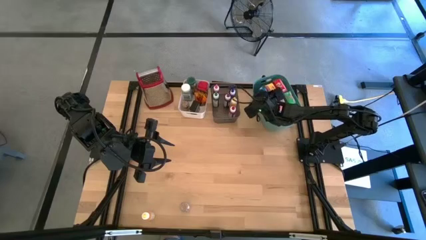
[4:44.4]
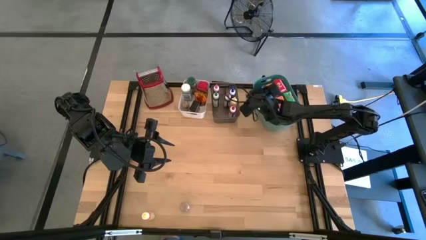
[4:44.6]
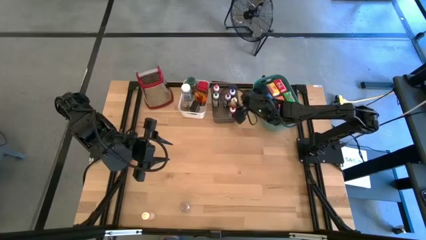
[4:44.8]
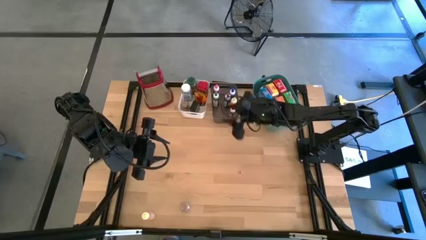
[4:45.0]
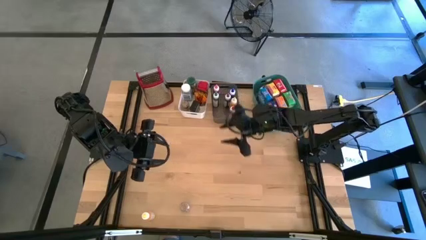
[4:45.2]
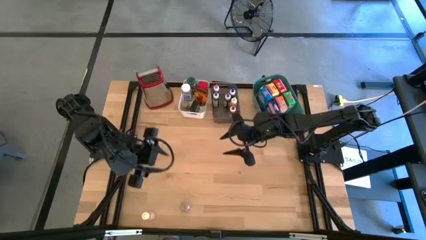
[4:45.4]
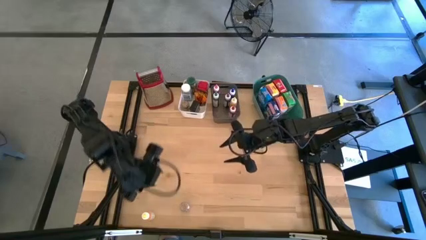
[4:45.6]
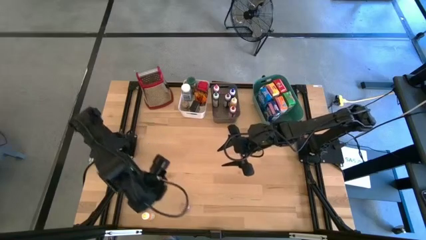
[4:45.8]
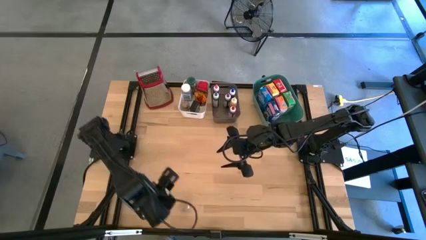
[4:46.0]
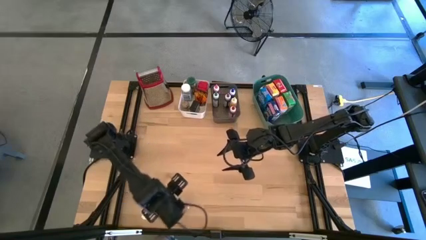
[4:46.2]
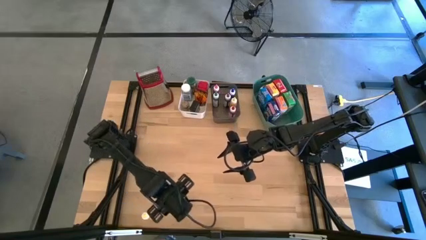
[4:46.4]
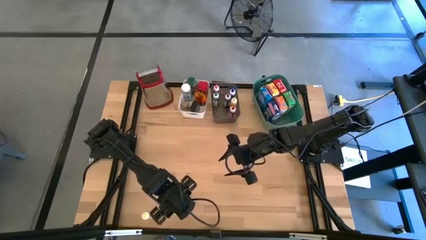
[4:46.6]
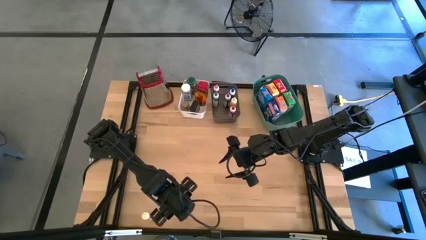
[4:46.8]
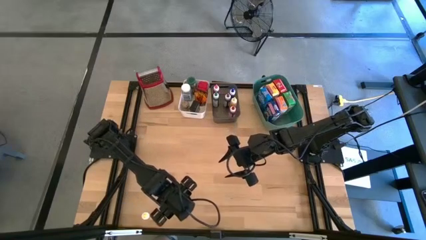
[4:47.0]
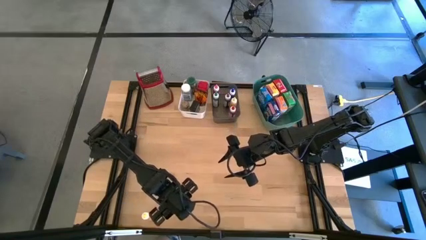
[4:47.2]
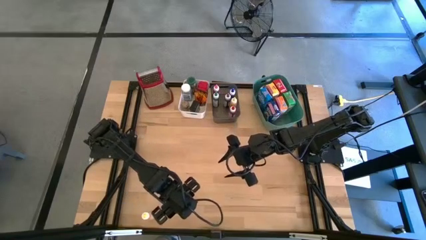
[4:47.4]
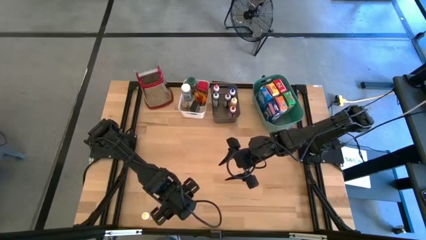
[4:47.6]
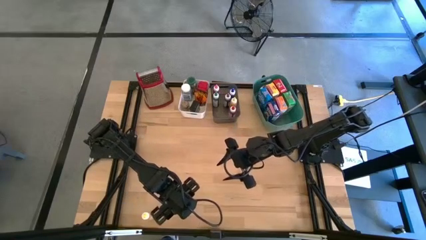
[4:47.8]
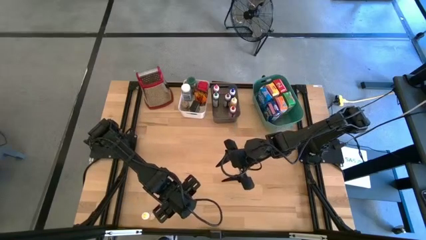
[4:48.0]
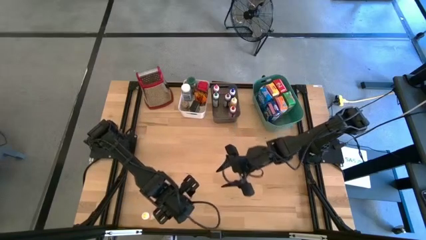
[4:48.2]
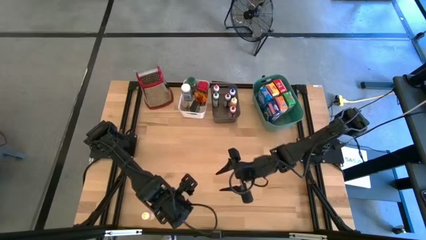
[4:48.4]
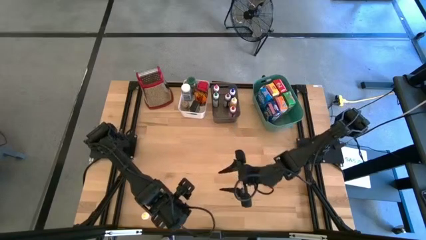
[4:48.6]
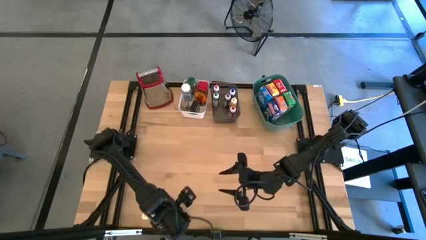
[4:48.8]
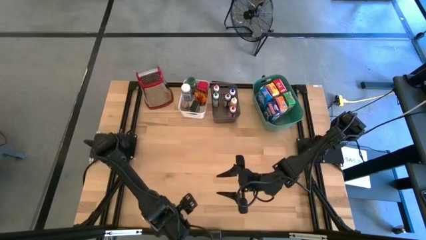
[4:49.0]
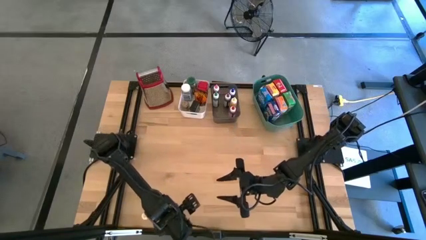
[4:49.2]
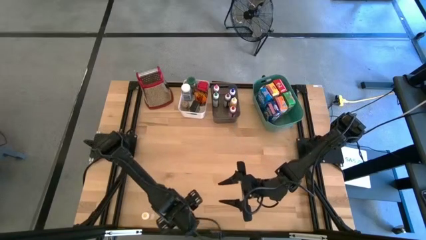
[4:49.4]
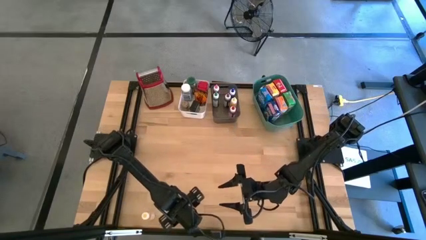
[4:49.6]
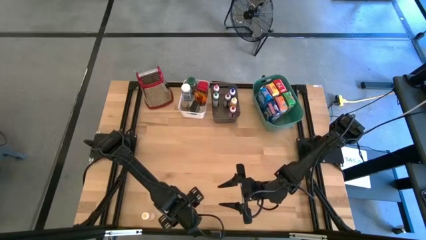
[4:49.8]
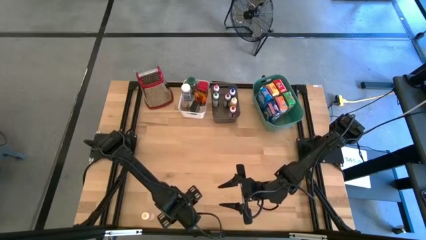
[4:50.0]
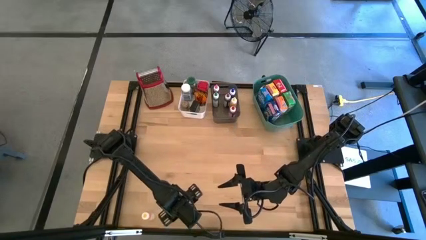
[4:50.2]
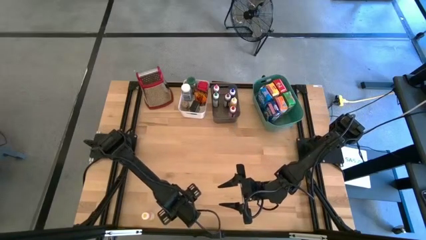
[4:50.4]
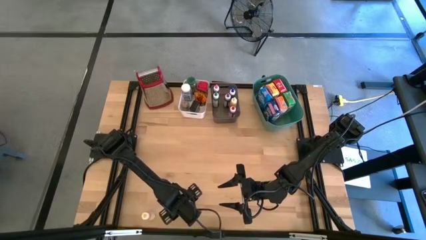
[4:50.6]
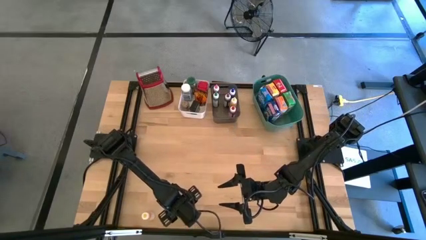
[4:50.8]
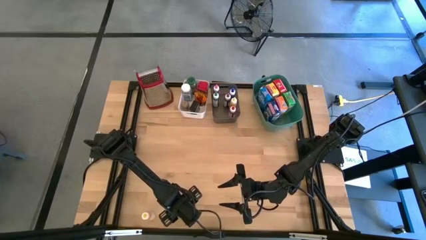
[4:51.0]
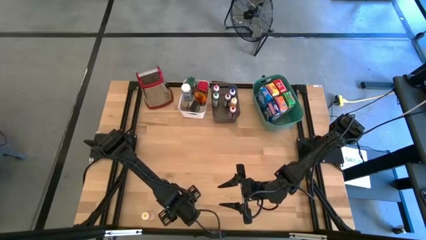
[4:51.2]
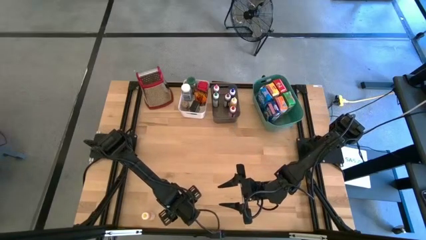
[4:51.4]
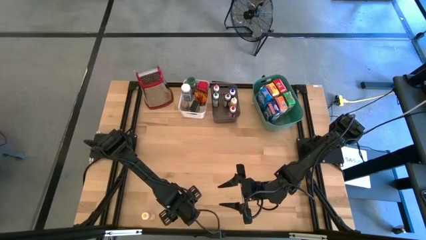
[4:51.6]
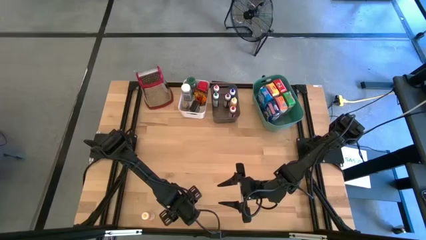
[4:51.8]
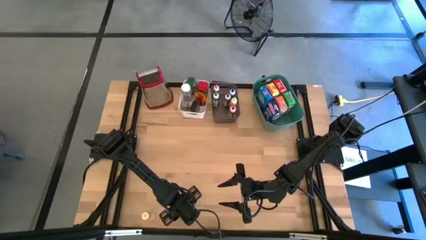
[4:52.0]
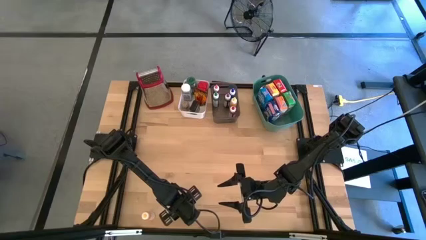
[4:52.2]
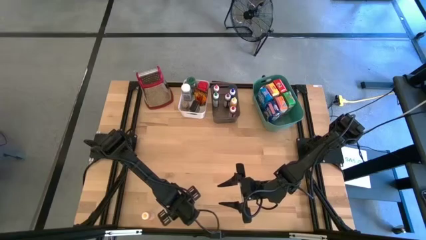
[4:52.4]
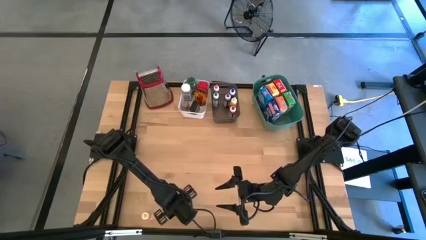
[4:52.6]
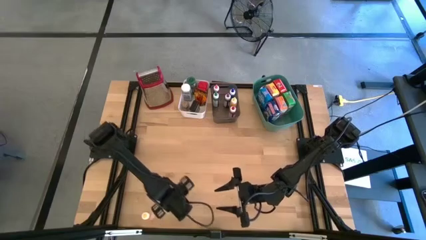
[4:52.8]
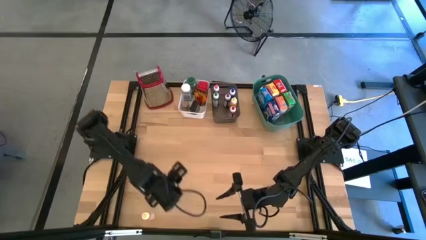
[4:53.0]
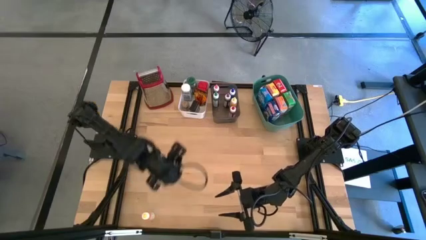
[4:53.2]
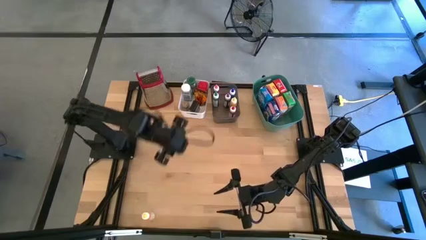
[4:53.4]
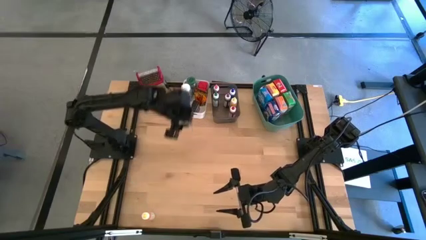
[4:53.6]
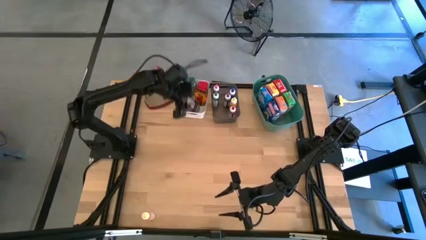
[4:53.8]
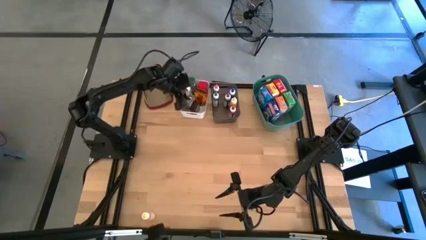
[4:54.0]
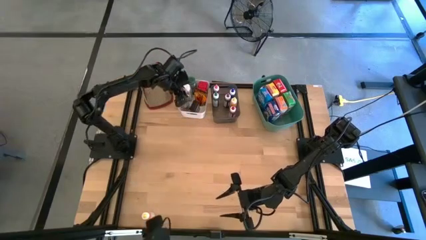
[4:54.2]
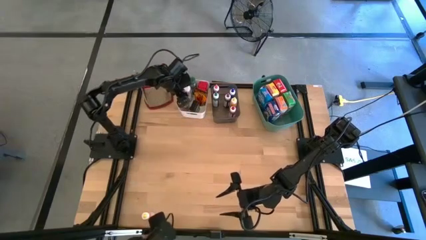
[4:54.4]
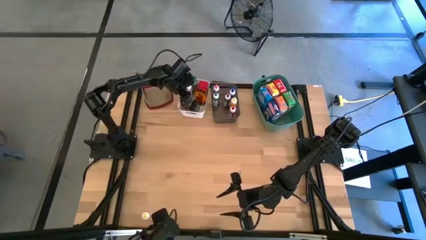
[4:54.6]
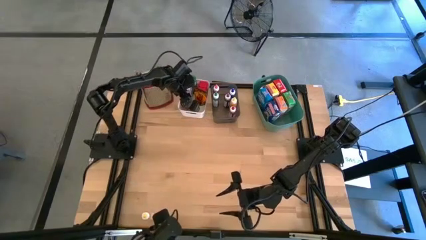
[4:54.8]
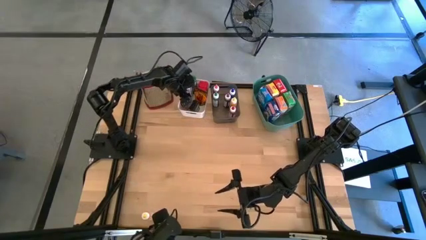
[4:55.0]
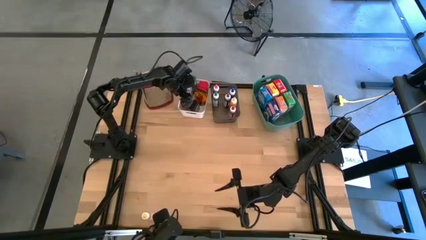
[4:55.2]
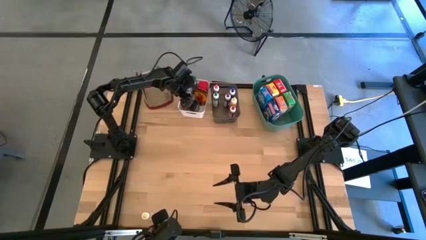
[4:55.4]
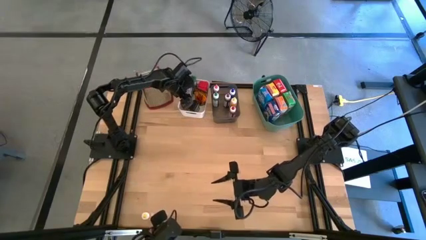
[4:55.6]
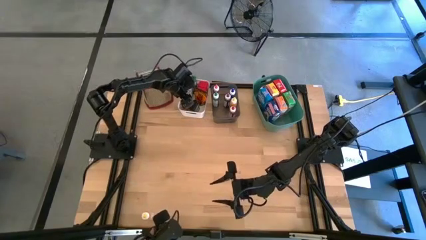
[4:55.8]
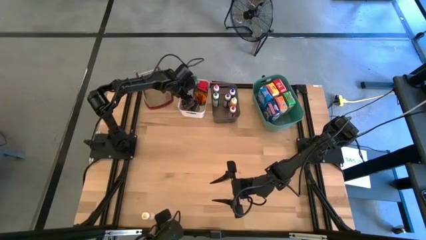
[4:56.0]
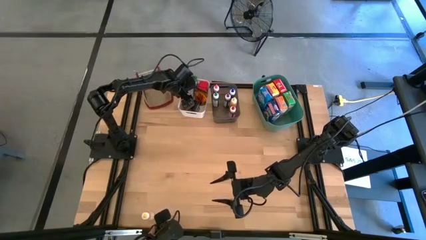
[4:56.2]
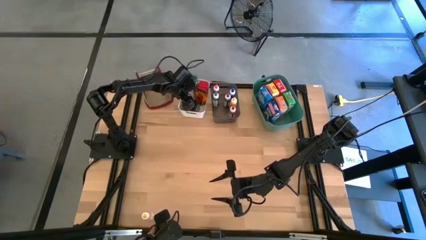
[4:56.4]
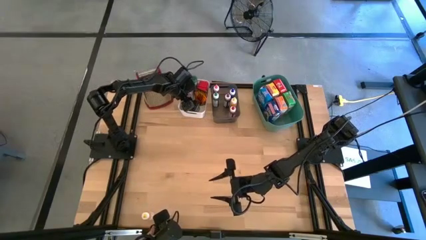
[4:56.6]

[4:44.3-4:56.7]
Task: Pick & Place Kitchen Items
Put the brown seasoning bottle into the white bin

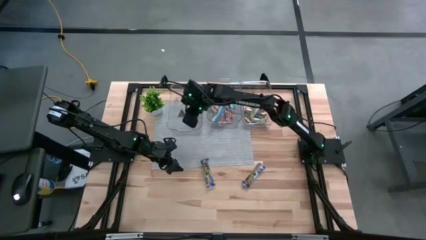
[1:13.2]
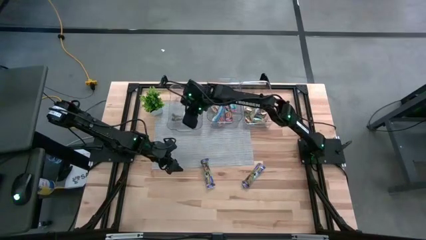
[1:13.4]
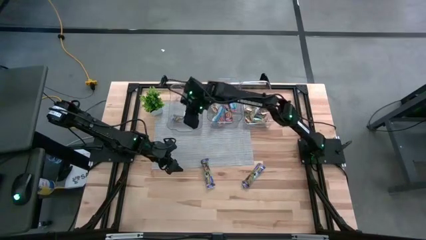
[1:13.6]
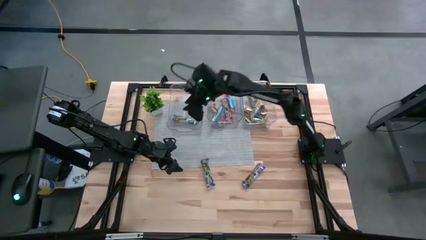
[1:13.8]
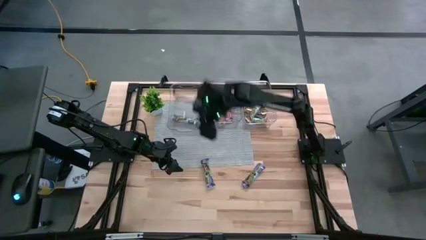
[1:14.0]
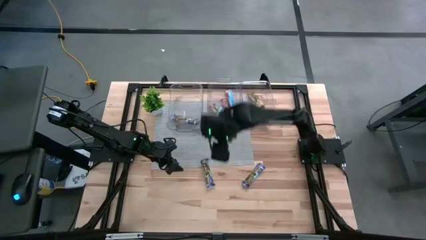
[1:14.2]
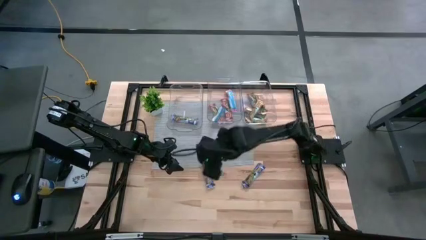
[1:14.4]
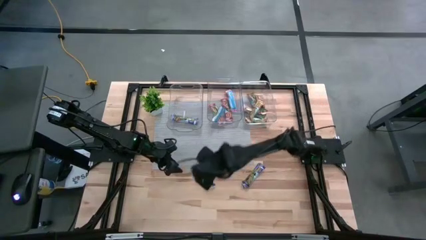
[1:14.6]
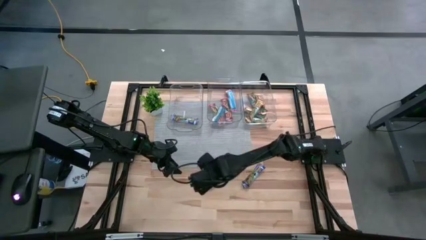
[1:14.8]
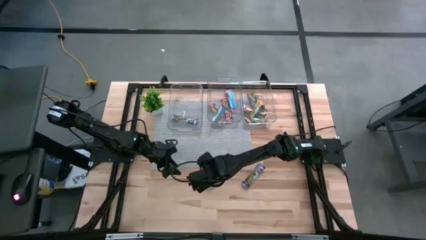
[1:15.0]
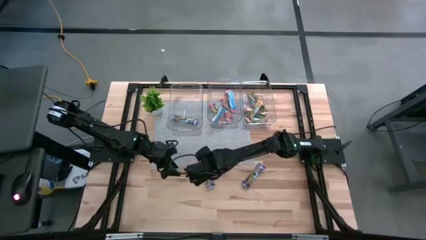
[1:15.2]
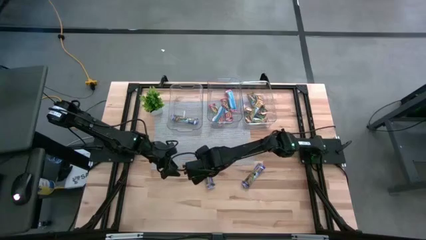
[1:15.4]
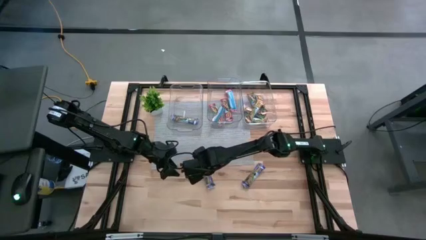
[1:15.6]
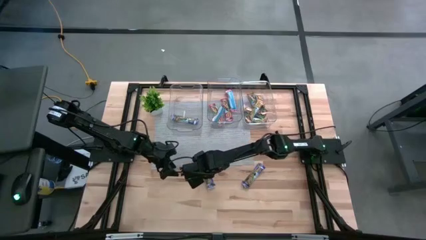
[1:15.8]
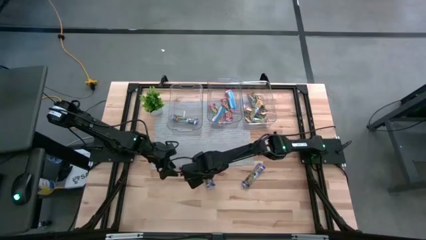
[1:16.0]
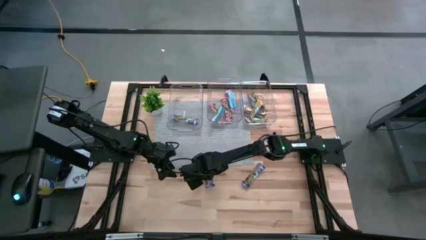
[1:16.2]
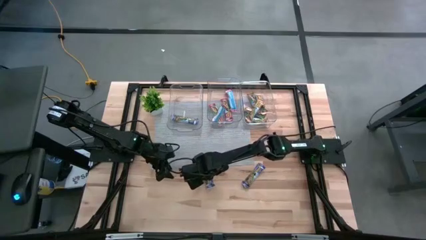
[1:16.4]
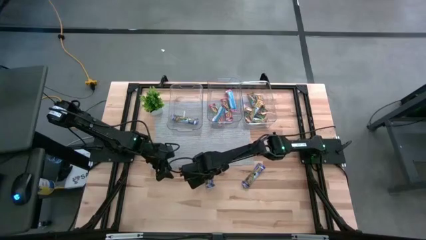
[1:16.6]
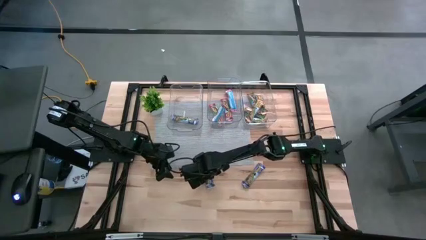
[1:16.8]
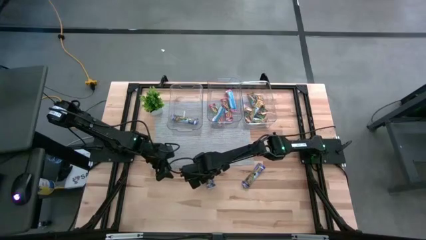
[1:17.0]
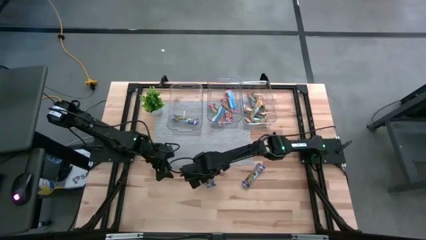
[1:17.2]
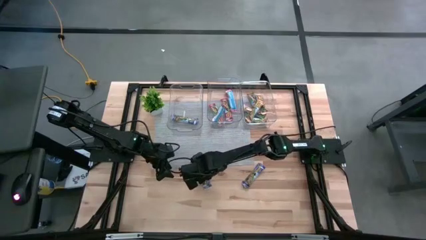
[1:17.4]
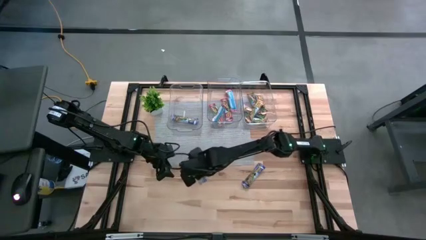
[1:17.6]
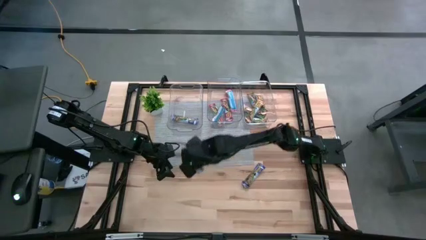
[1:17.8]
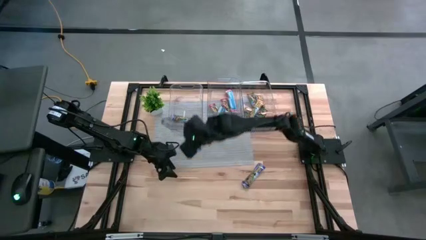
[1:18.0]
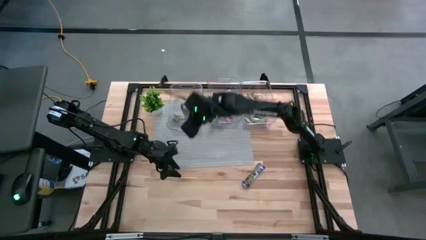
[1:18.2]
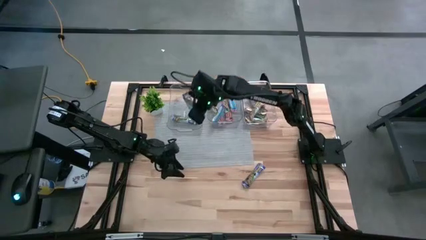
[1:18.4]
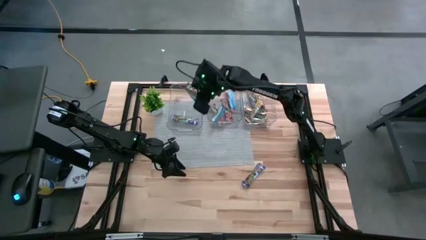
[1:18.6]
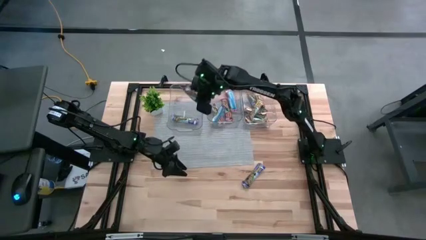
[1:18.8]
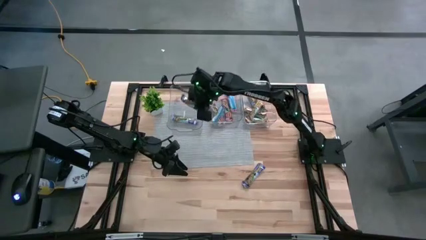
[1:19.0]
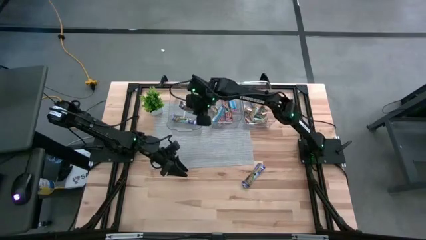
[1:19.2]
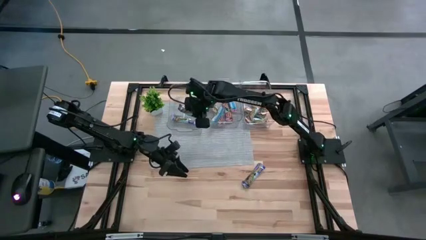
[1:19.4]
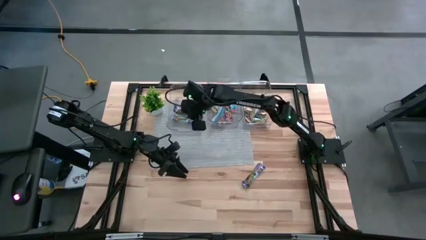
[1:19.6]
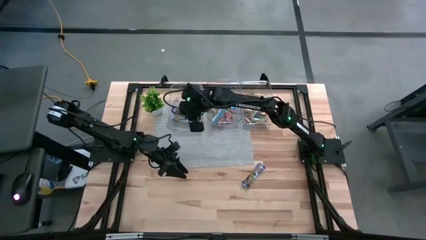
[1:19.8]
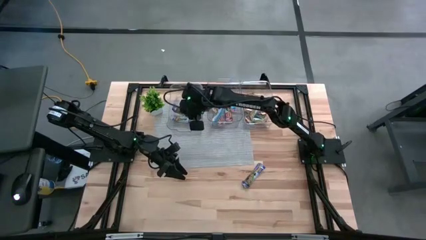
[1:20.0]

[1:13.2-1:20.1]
Task: Pick and place Granola Bars by type
Put the blue granola bar into the left transparent bin
